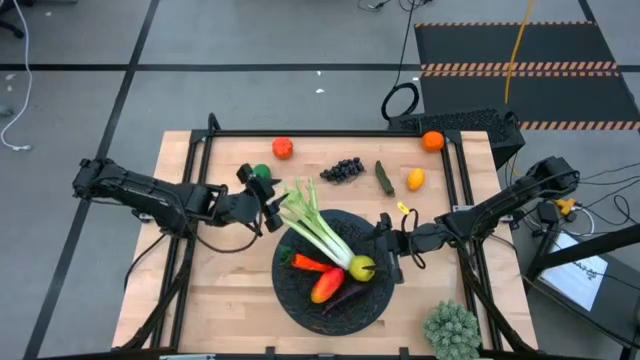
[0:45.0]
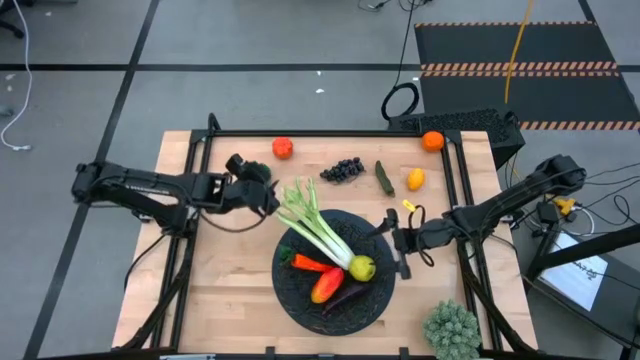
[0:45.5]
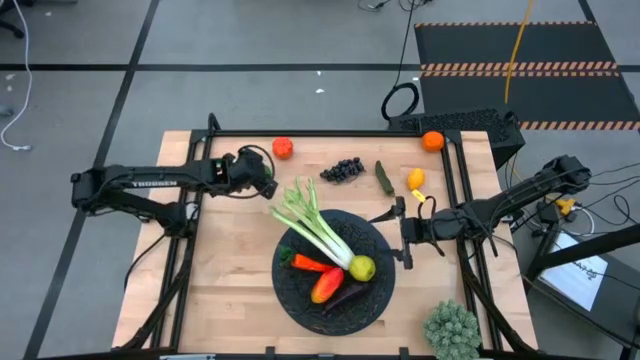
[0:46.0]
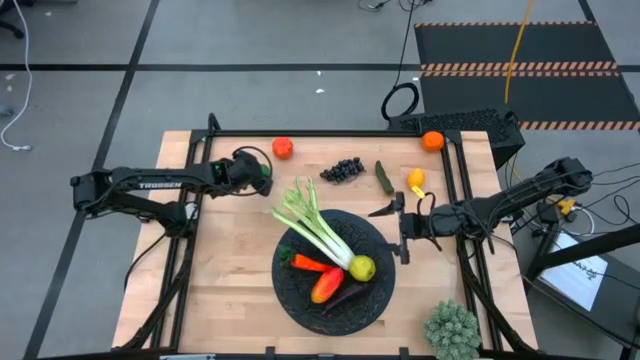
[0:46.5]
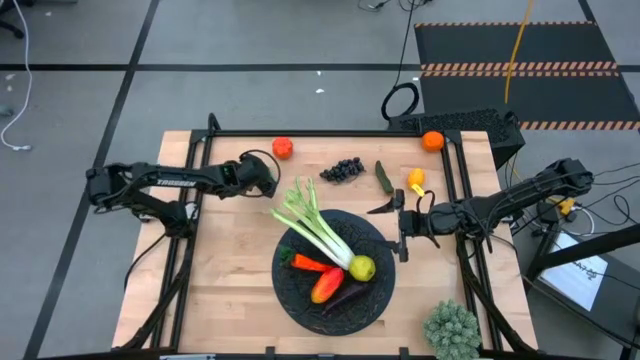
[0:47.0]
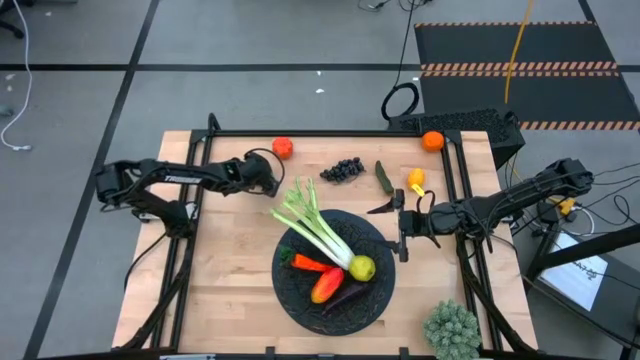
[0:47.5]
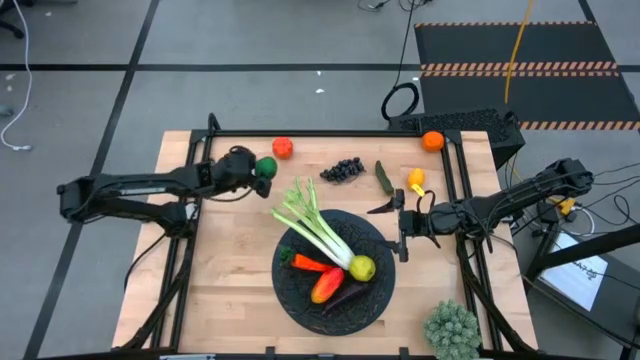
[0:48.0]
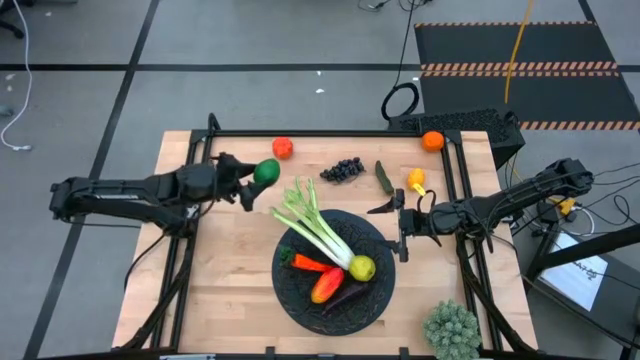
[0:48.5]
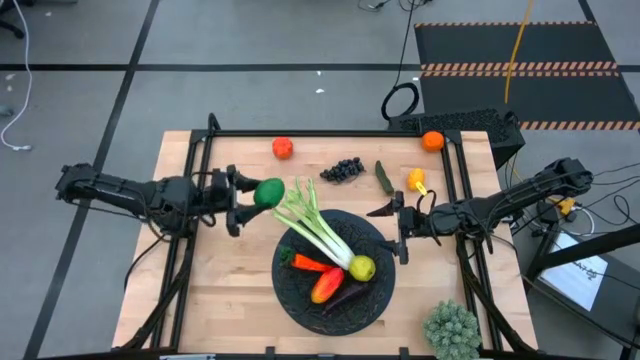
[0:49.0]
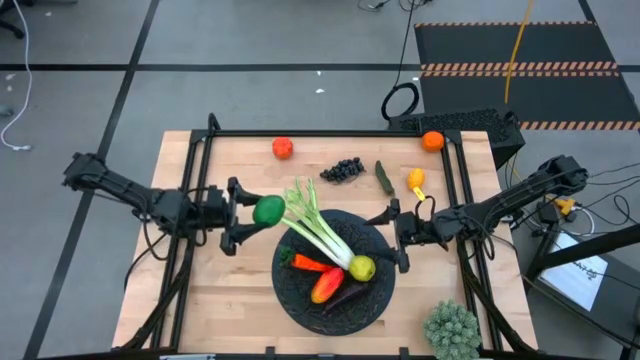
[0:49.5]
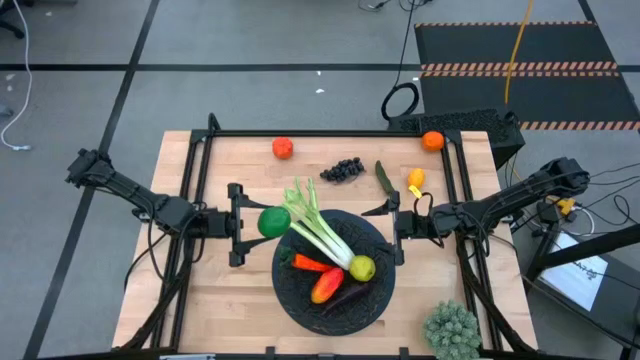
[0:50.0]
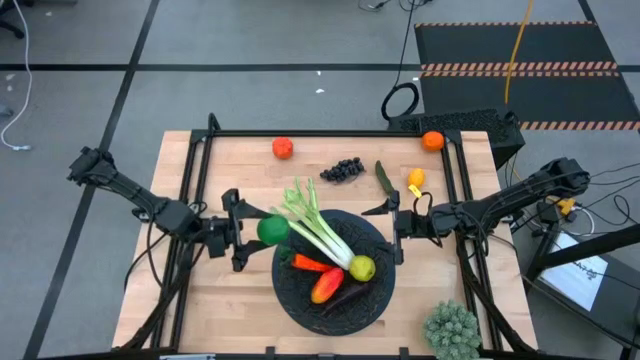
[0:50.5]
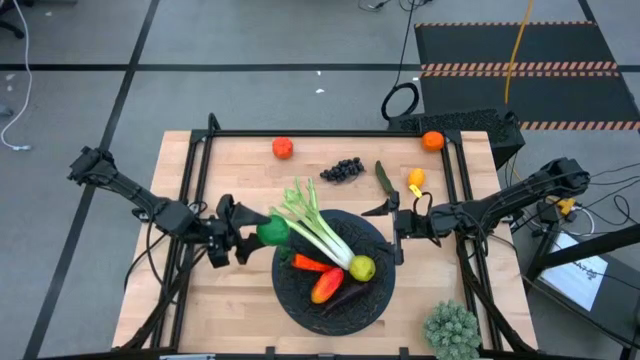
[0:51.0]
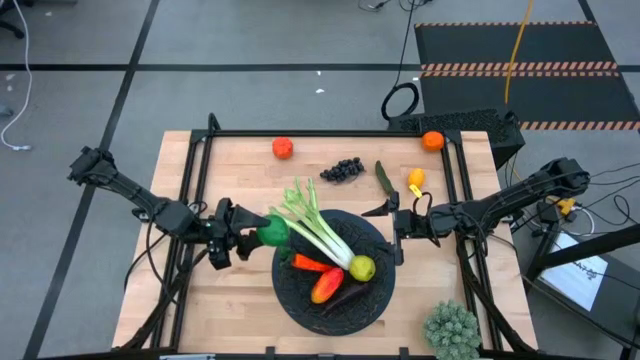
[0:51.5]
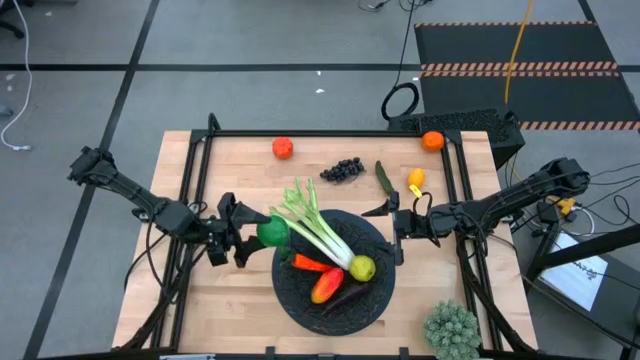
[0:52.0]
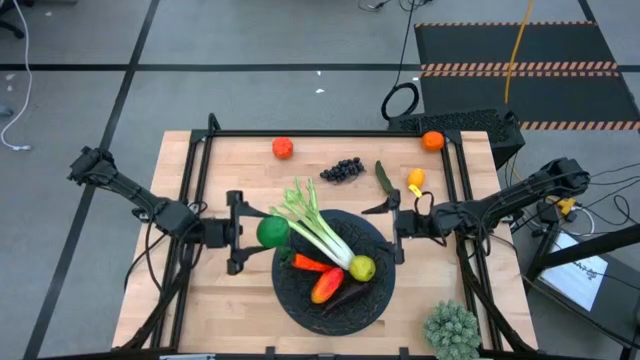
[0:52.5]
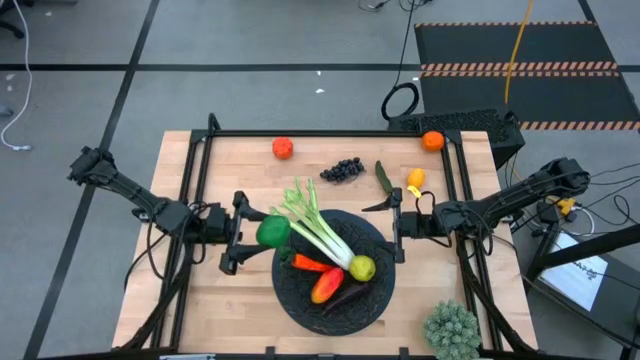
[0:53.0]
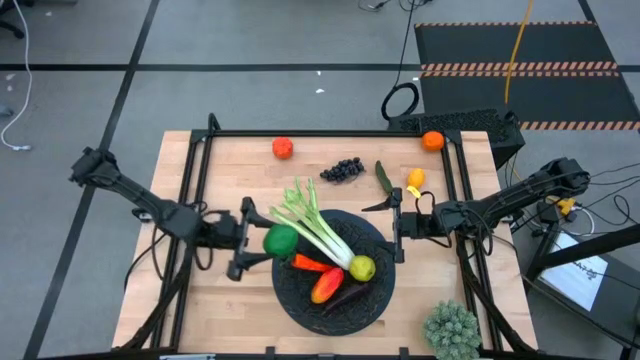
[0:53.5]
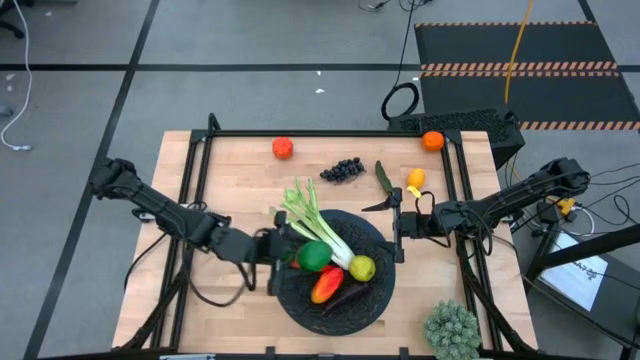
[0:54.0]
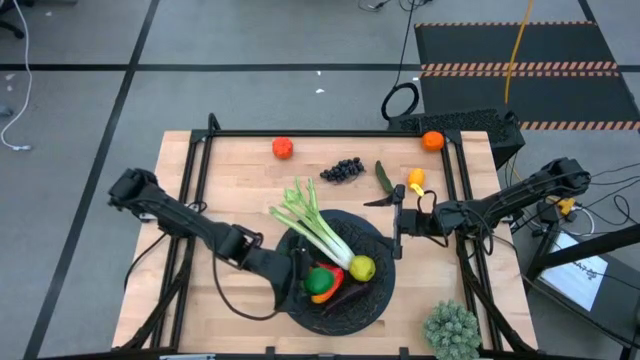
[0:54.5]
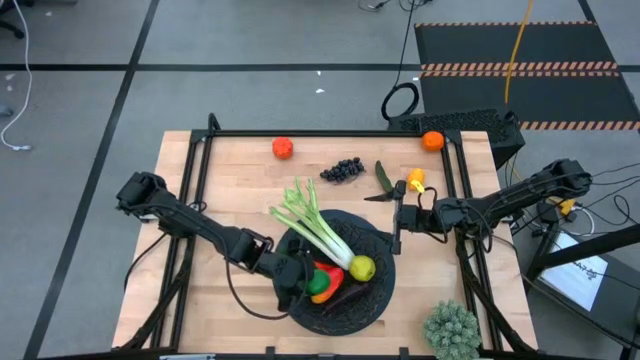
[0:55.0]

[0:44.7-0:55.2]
Task: Build produce basket
Put the green lime into the black mesh basket

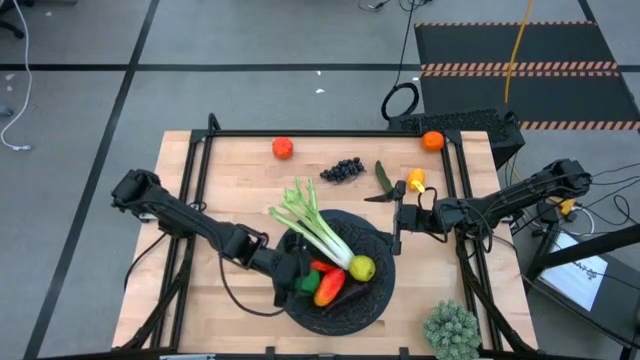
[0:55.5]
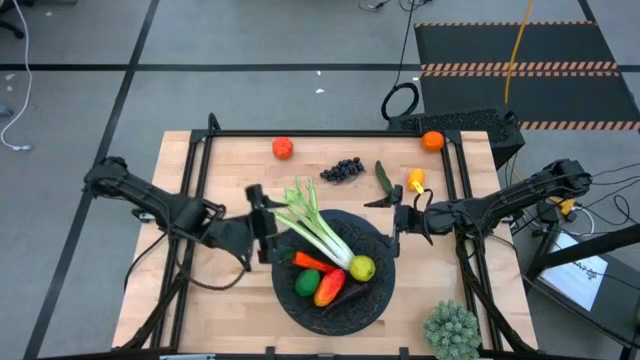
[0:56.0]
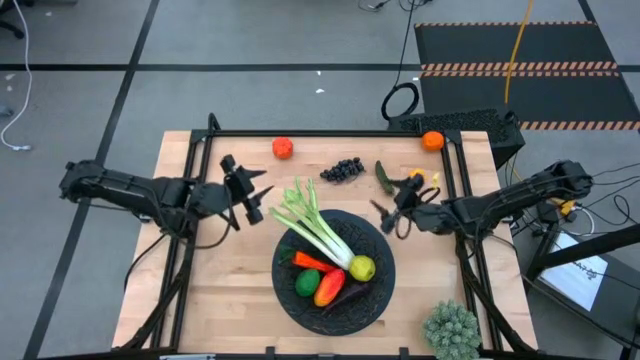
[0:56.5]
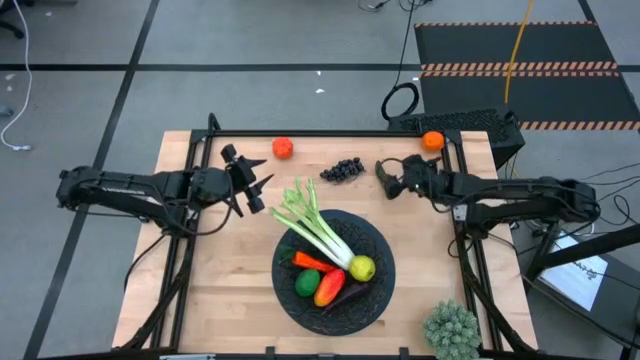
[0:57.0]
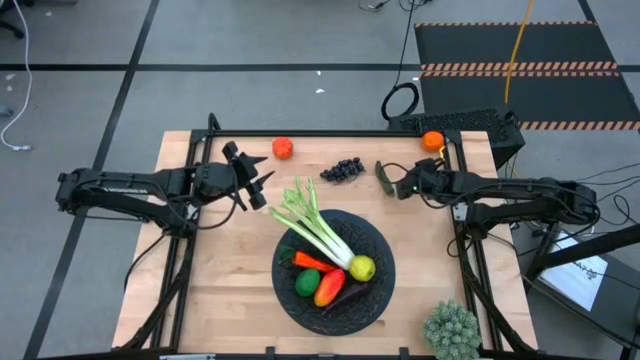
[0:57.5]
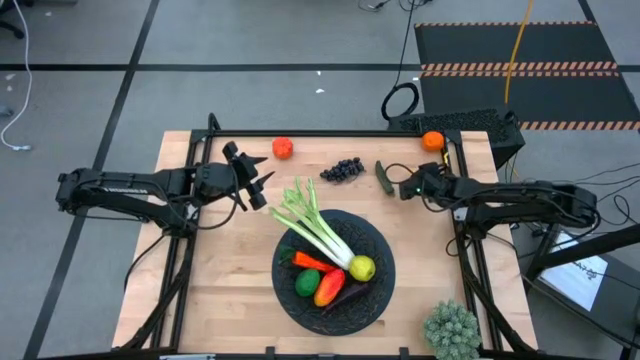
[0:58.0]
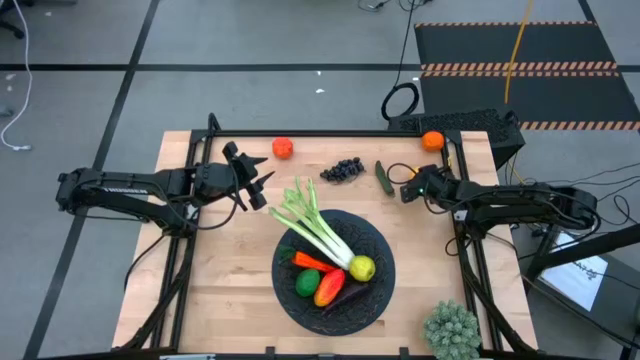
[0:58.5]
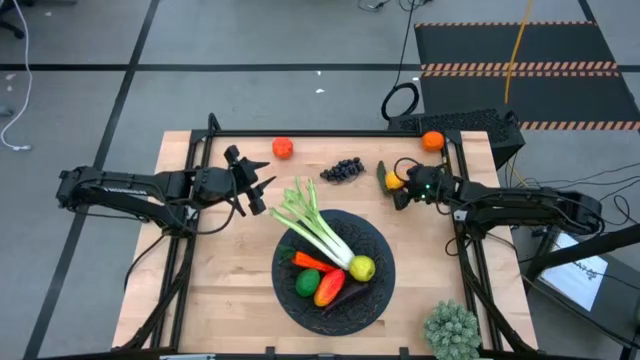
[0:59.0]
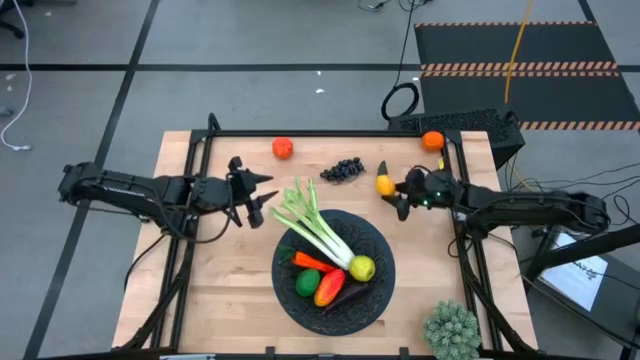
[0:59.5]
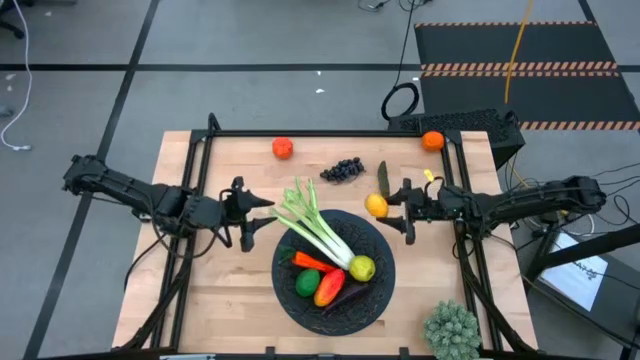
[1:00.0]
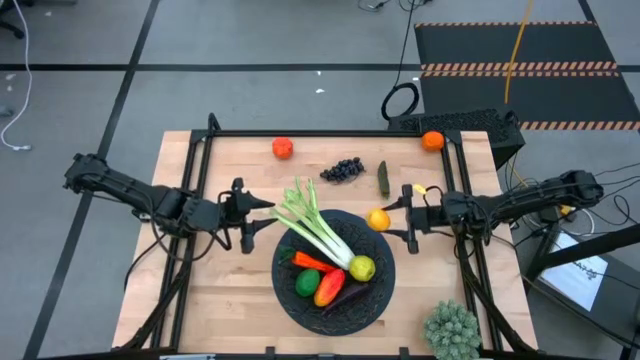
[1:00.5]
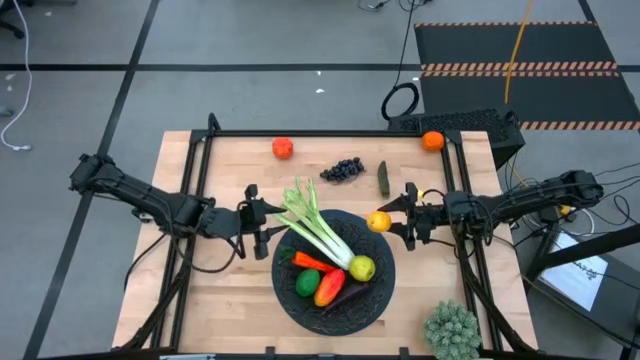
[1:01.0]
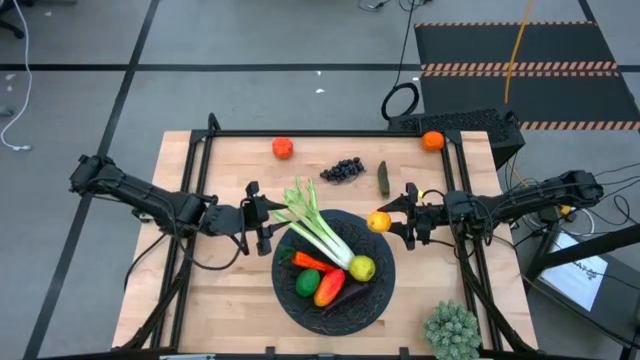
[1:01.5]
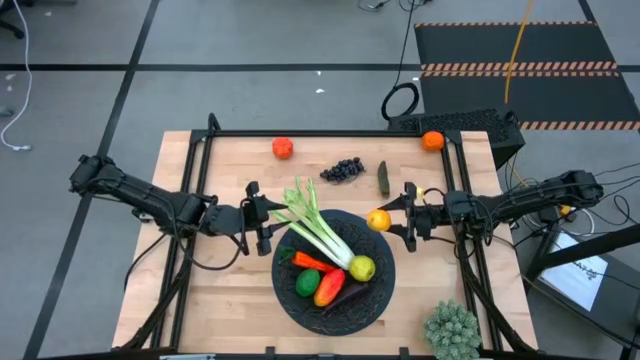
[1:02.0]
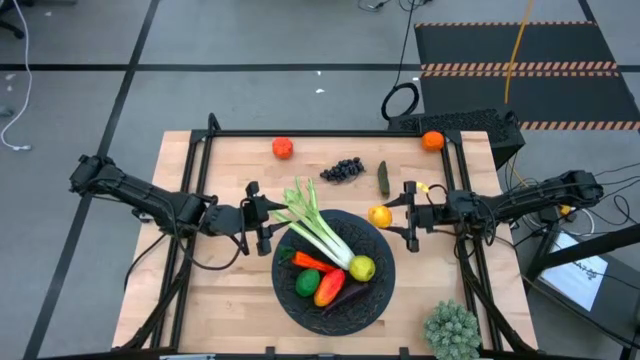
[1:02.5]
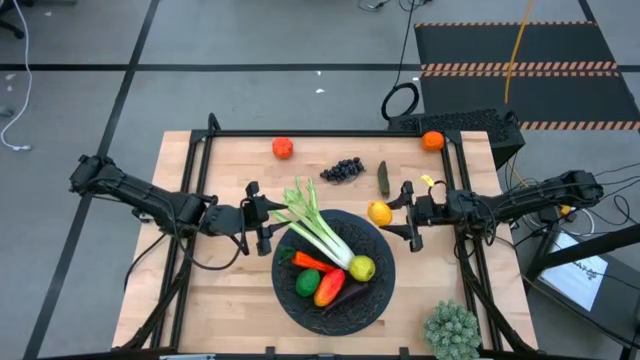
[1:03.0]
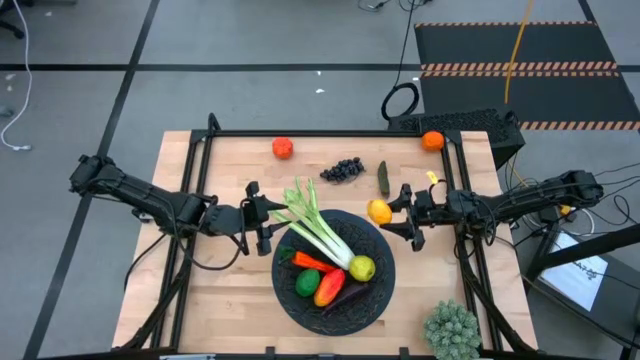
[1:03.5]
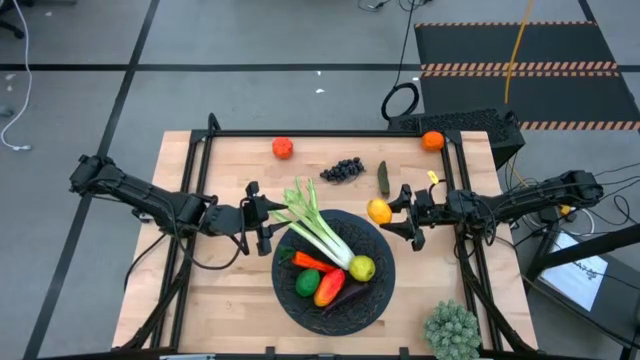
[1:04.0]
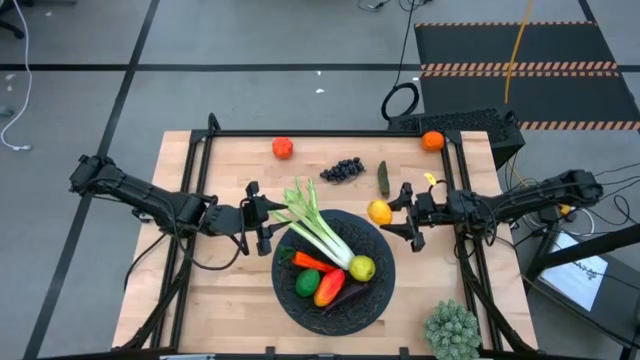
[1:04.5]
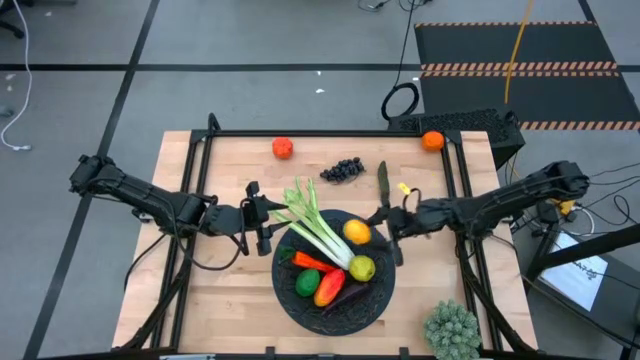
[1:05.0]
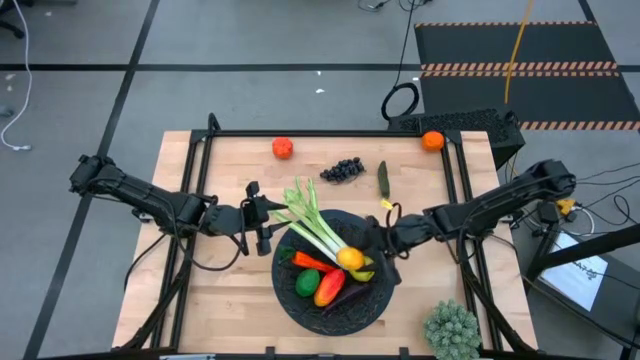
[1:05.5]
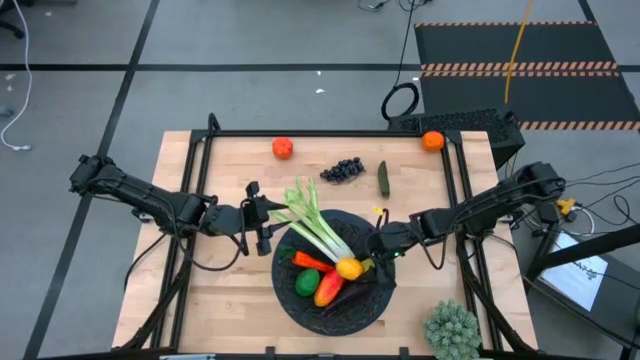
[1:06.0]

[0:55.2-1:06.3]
Put the yellow lemon into the black mesh basket
